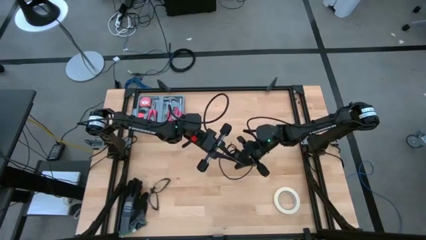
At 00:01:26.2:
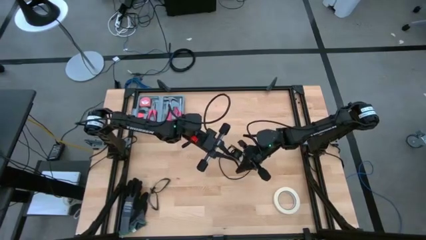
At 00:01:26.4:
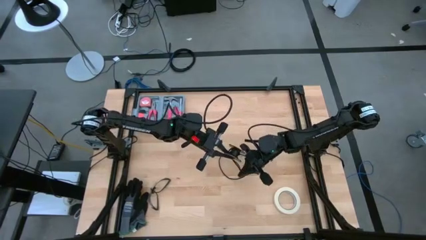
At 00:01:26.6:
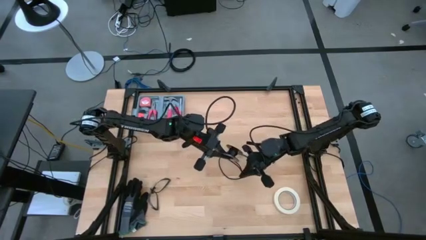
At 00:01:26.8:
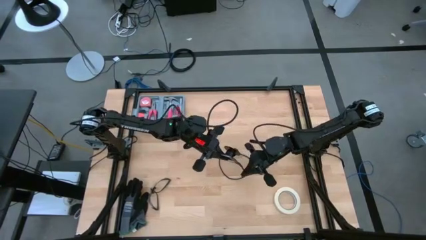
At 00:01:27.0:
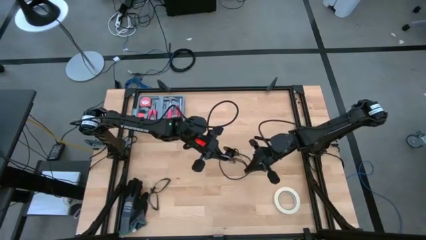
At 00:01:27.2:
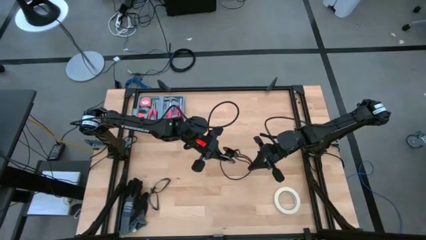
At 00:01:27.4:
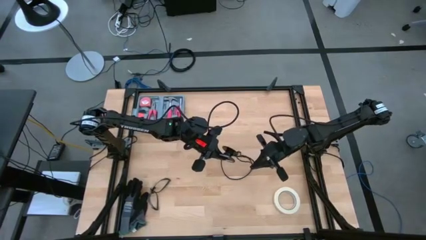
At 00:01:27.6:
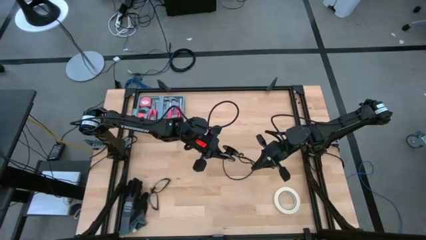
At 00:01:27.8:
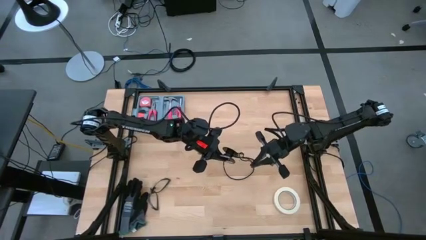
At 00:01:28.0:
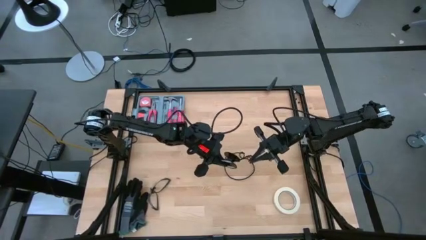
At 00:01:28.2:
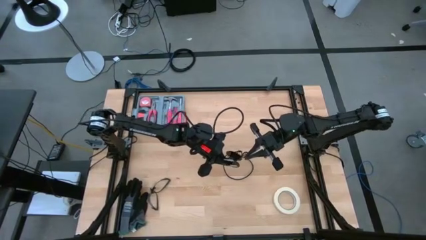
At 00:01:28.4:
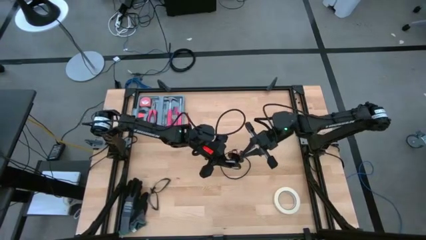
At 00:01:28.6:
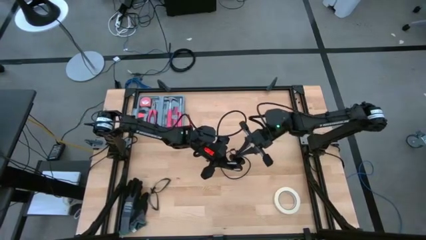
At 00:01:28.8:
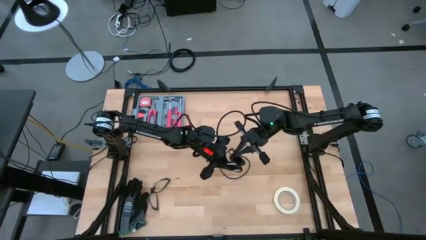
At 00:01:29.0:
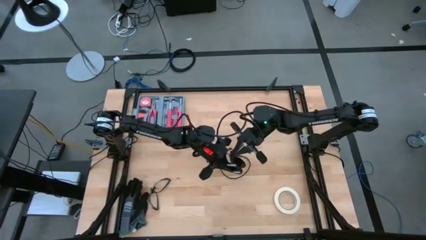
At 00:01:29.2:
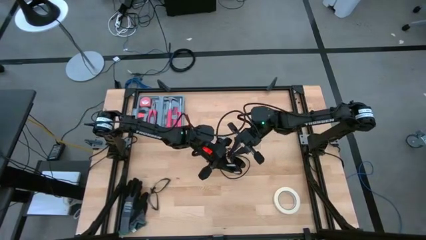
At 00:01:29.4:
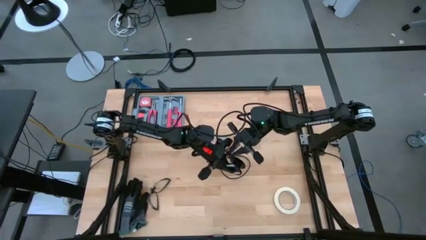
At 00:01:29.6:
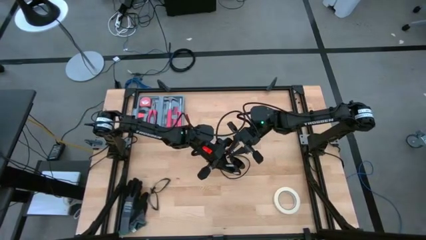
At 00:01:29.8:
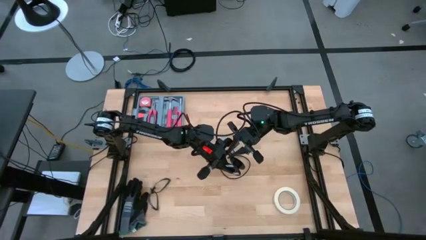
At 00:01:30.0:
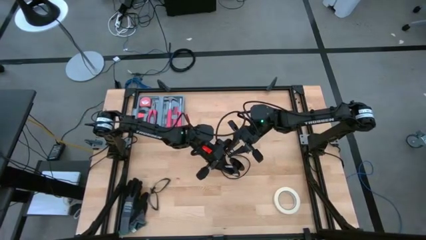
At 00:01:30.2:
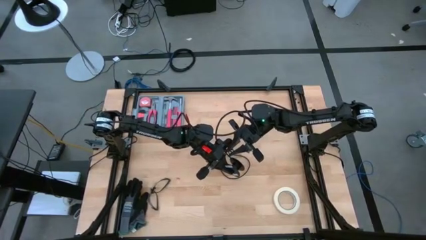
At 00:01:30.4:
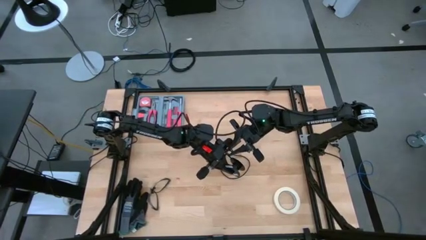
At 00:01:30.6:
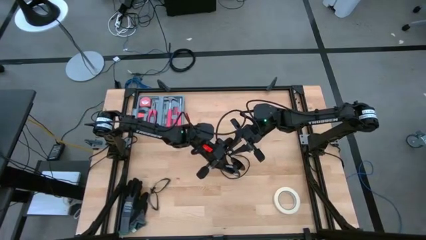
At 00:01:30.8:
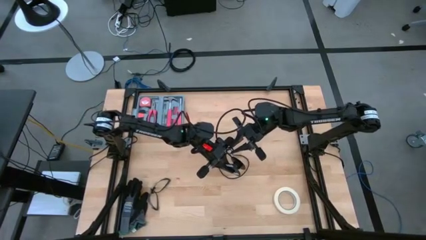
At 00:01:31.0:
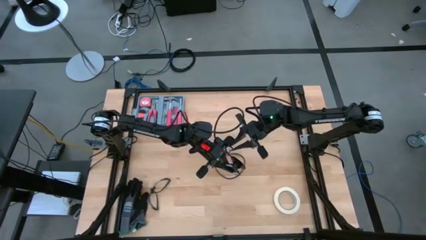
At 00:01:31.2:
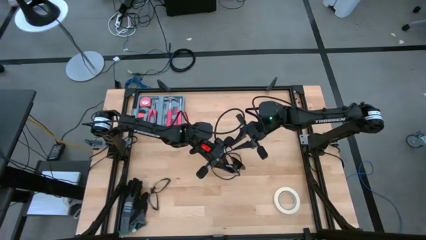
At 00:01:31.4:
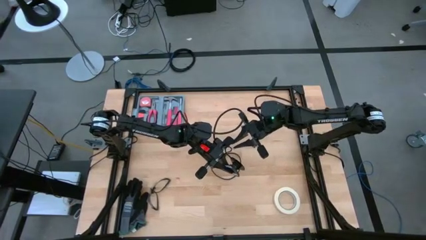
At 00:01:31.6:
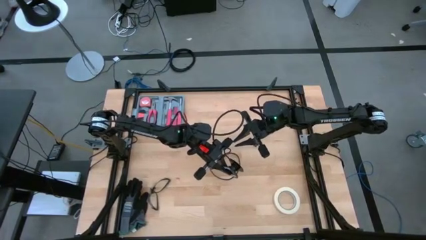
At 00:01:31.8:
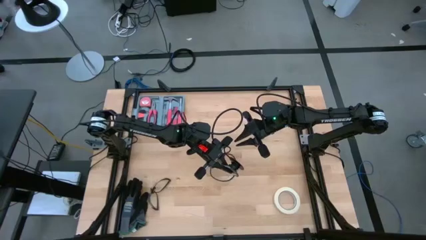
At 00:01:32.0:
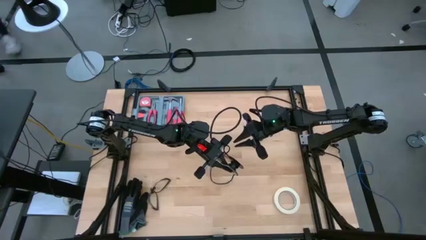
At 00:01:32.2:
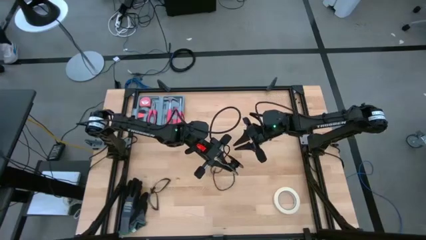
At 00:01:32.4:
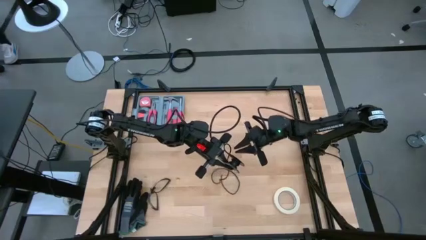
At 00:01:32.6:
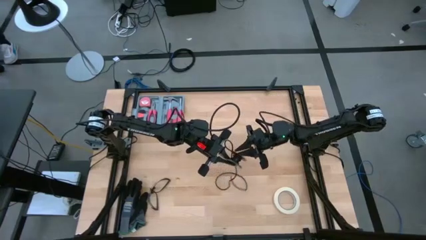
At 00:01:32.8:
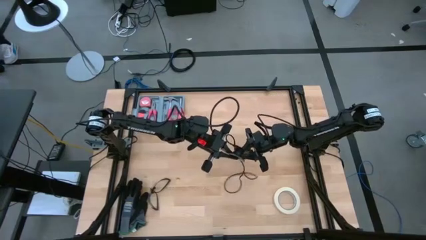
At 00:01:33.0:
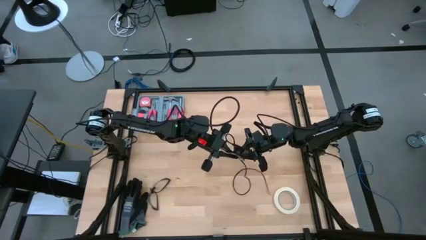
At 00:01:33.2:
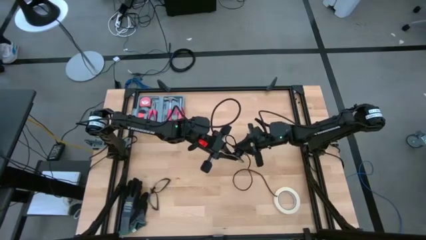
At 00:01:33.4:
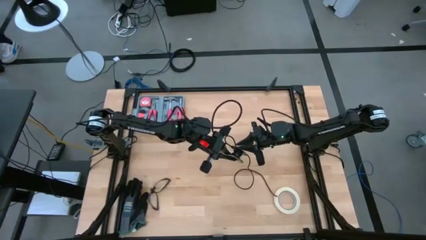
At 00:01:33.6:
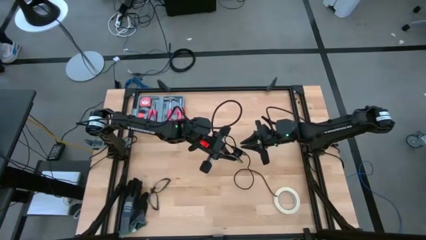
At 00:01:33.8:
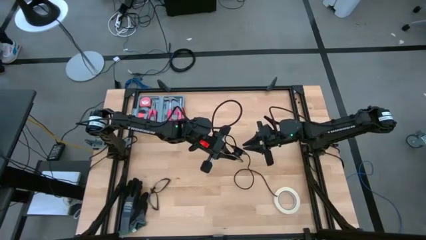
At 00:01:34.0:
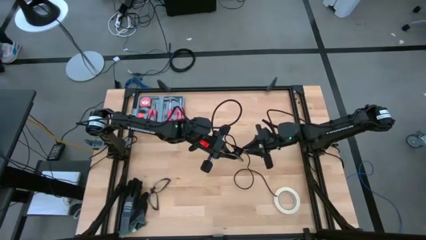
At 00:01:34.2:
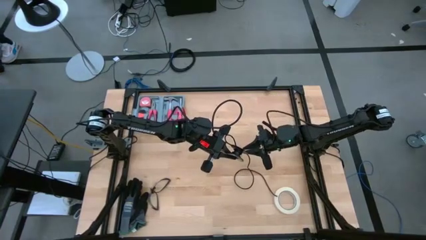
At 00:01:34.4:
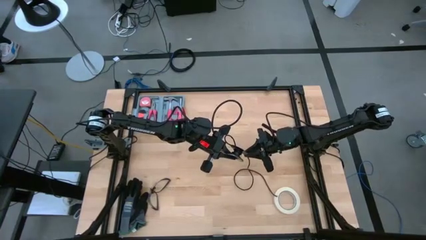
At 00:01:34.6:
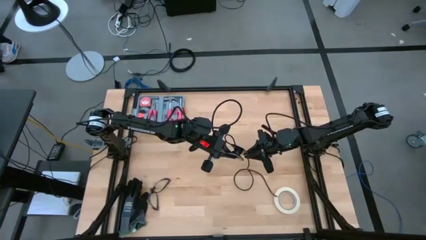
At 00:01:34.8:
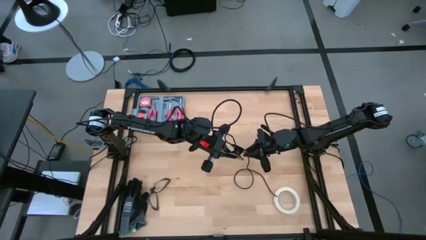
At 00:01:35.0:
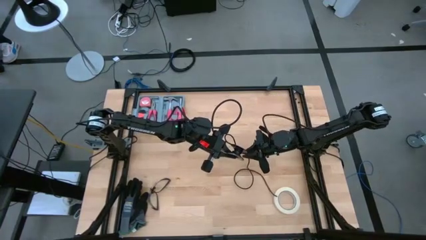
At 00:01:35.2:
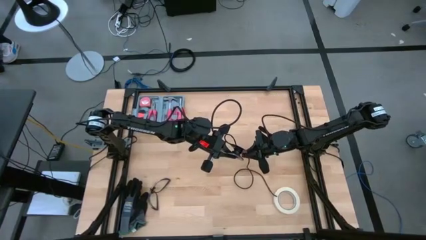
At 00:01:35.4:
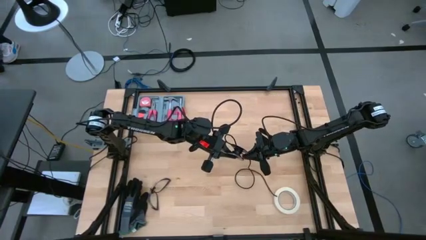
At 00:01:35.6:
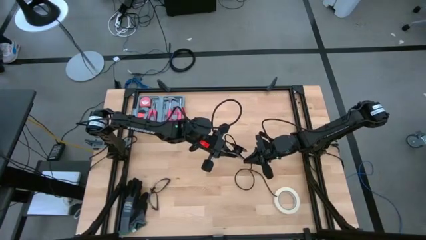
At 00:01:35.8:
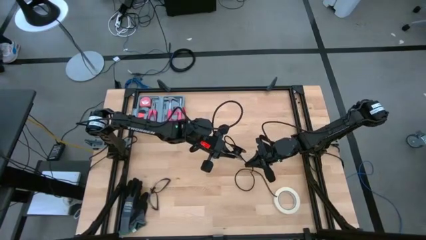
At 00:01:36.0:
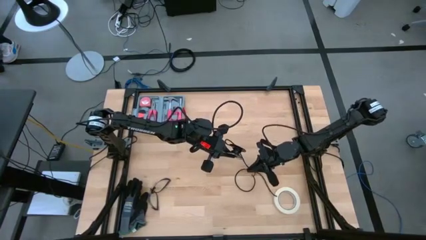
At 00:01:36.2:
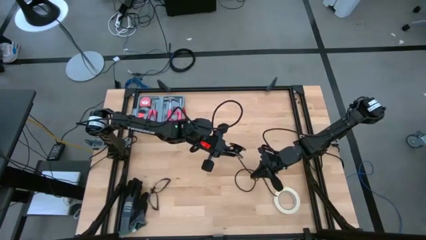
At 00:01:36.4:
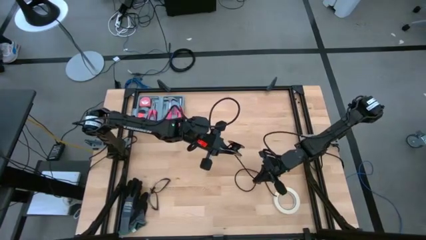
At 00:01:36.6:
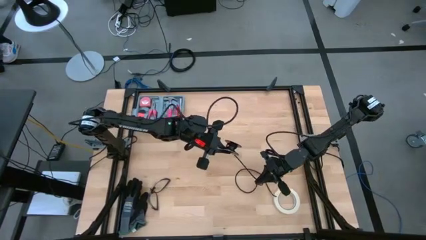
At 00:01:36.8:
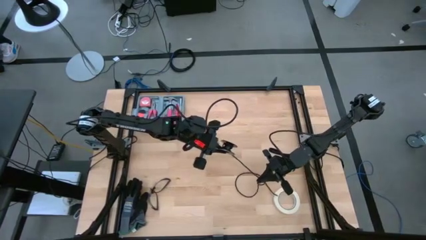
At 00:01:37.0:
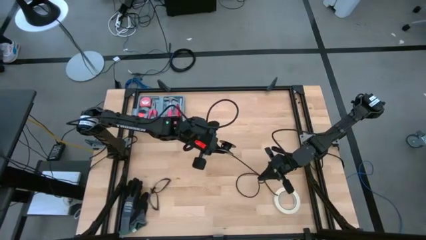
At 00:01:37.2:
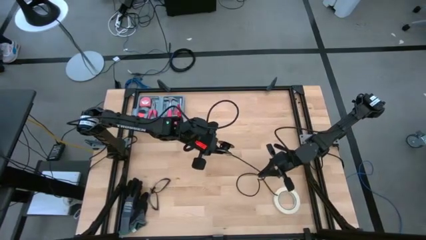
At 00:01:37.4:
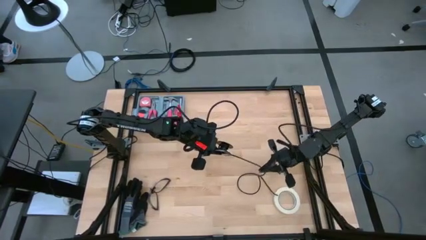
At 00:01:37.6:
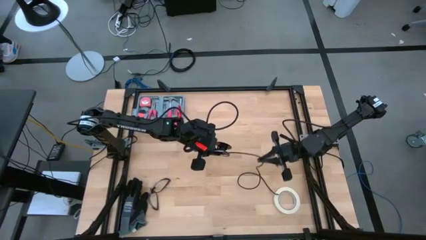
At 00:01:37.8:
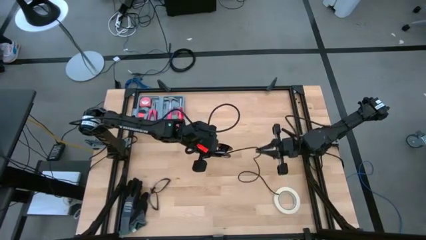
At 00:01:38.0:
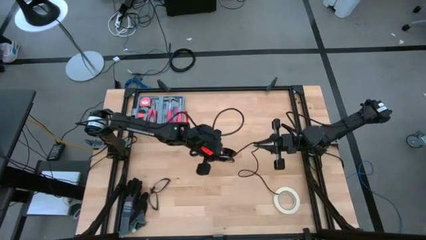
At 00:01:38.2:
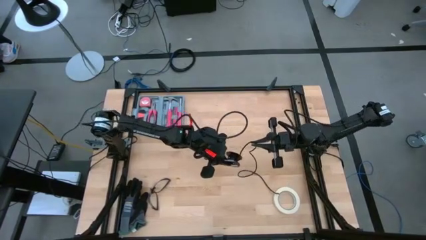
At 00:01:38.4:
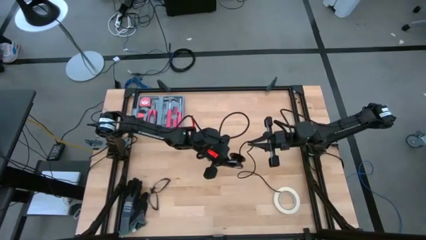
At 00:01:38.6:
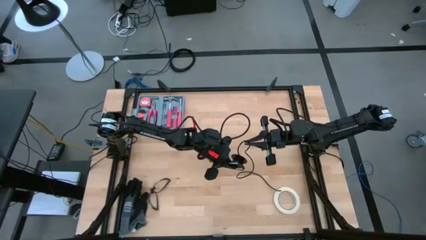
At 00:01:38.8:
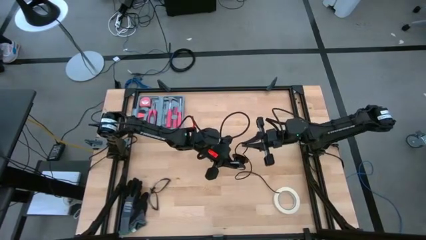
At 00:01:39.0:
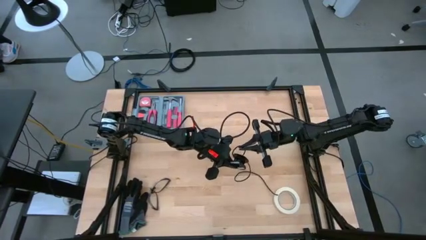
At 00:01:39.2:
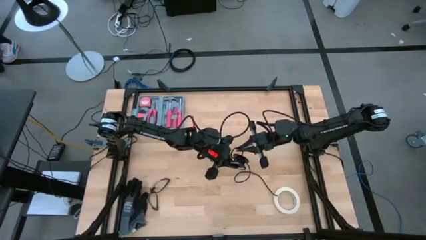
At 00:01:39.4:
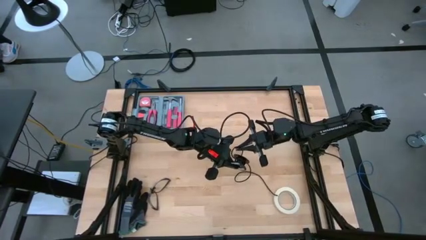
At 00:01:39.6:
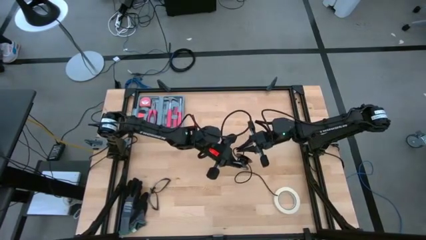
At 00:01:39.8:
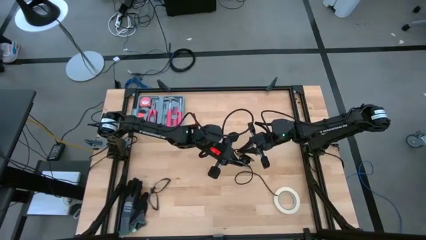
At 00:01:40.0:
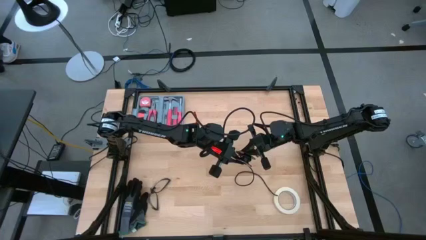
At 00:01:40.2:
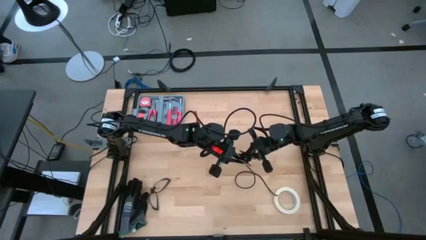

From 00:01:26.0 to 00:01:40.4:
Task: Coil cords
Coil the black wire onto the spool

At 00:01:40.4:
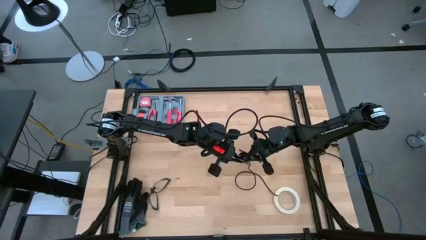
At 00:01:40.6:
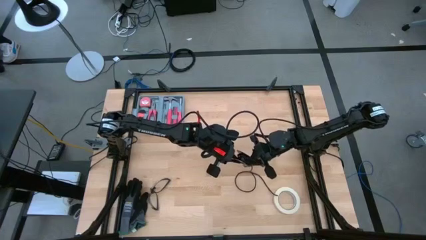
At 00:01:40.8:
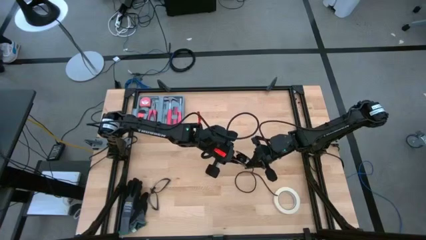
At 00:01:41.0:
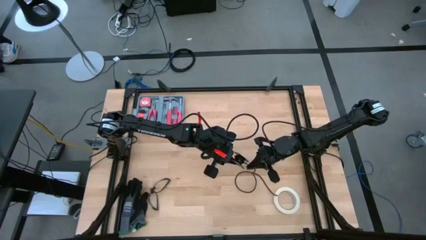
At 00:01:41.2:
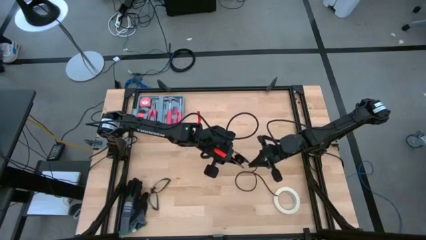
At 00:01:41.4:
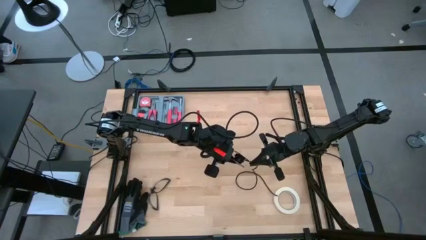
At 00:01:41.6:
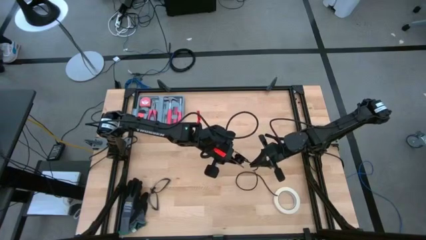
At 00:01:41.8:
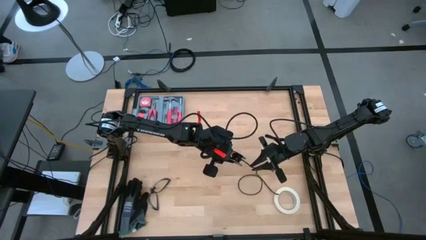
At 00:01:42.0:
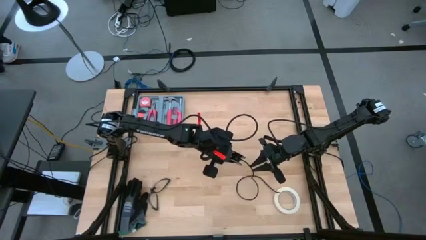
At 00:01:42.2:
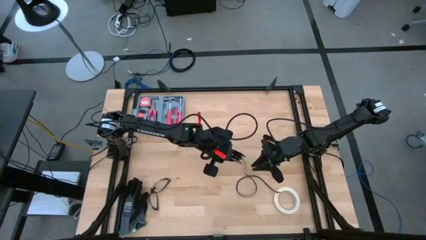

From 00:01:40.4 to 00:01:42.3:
Coil the black wire onto the spool
